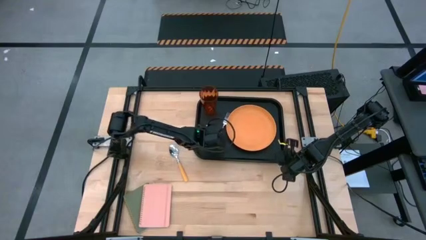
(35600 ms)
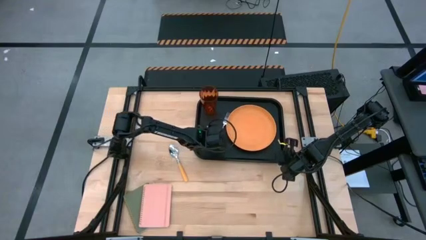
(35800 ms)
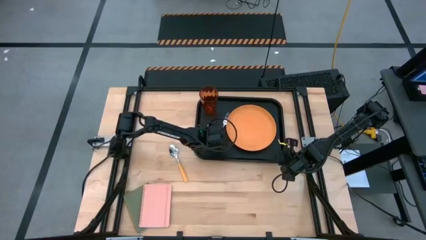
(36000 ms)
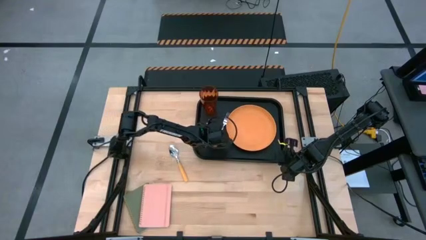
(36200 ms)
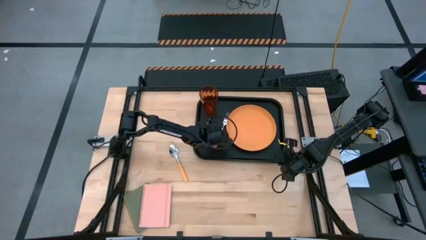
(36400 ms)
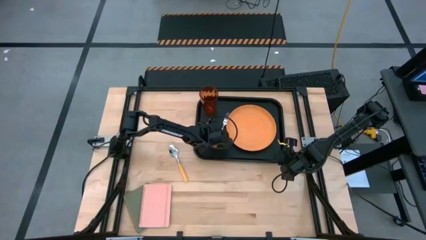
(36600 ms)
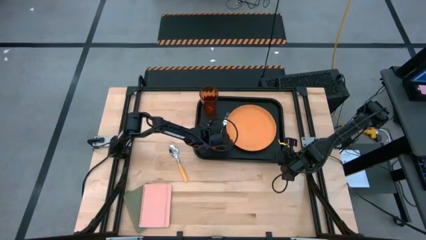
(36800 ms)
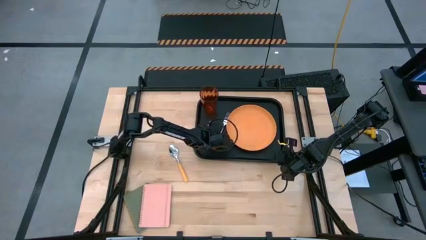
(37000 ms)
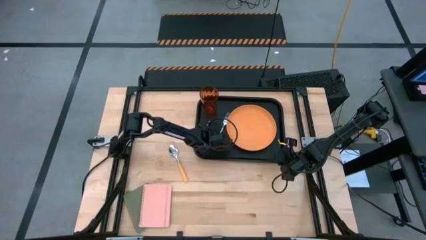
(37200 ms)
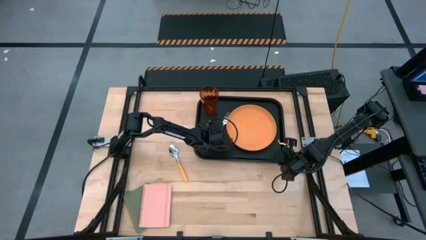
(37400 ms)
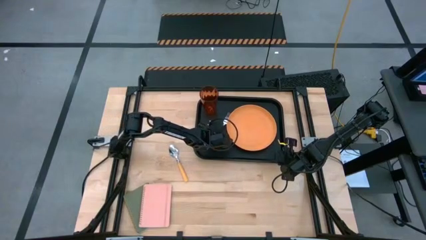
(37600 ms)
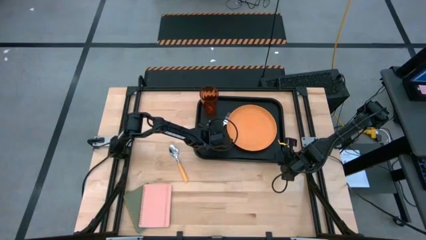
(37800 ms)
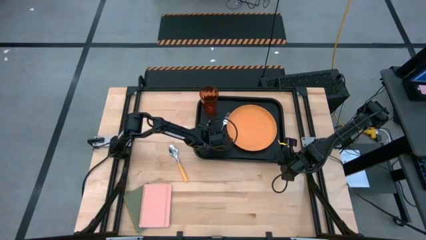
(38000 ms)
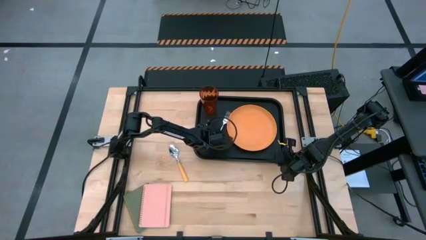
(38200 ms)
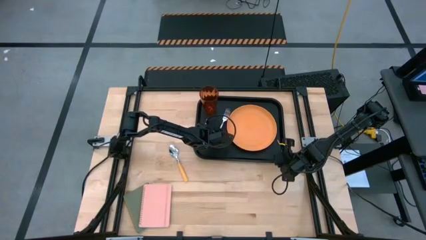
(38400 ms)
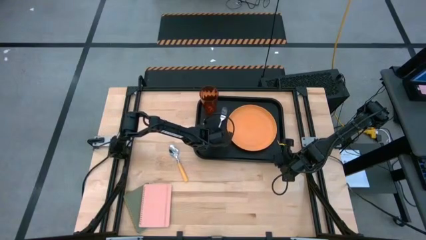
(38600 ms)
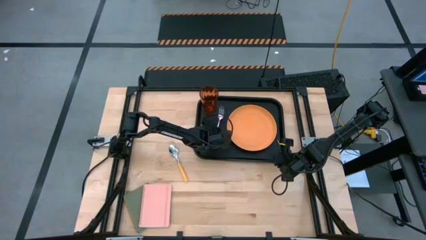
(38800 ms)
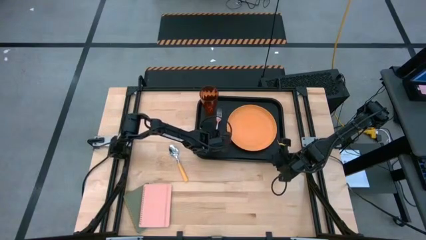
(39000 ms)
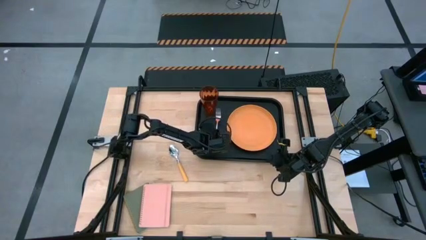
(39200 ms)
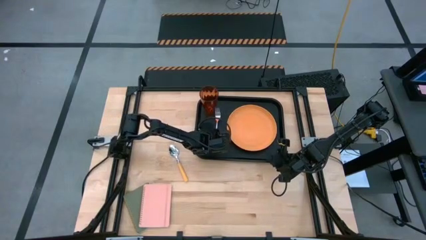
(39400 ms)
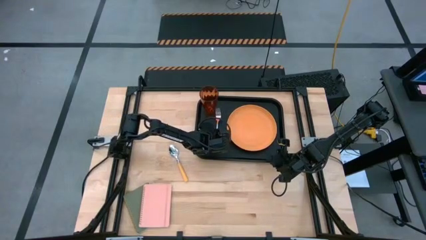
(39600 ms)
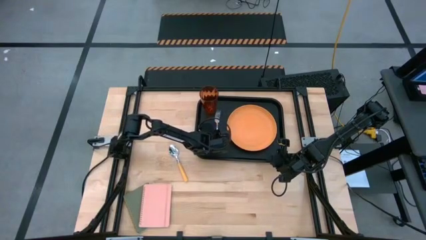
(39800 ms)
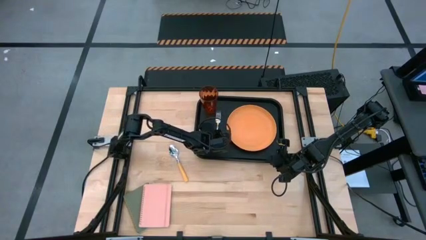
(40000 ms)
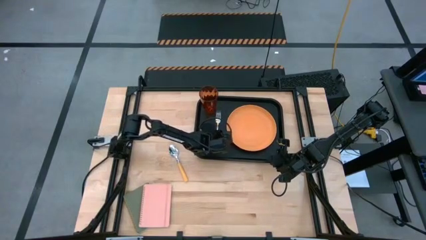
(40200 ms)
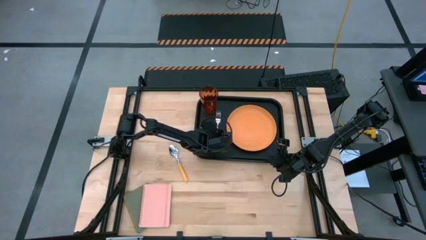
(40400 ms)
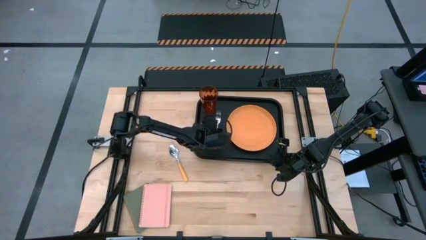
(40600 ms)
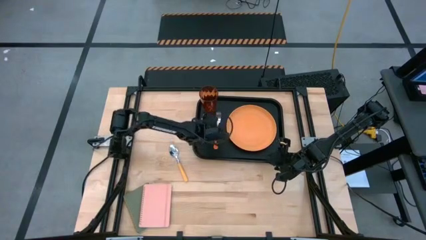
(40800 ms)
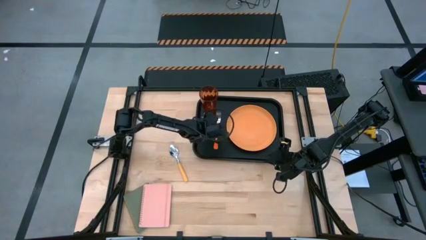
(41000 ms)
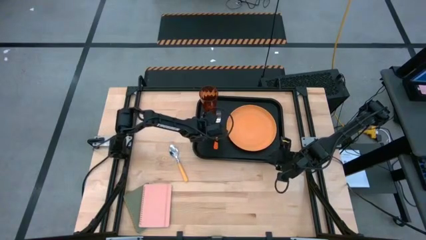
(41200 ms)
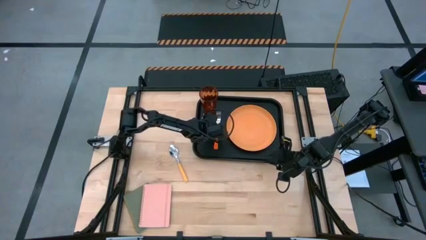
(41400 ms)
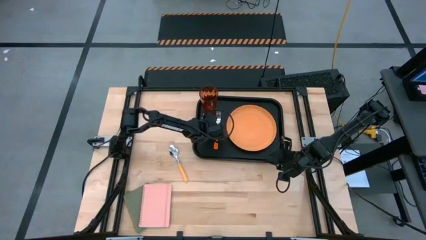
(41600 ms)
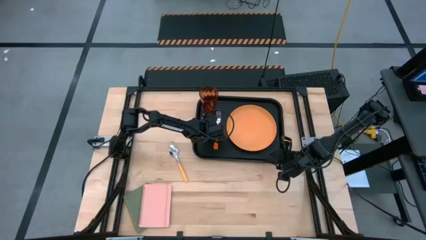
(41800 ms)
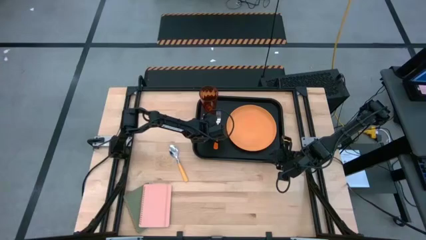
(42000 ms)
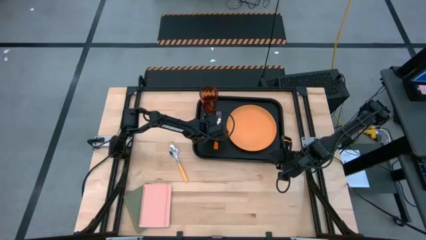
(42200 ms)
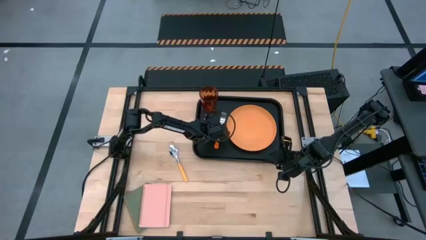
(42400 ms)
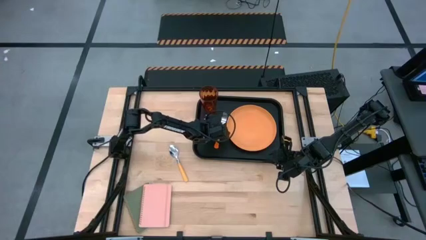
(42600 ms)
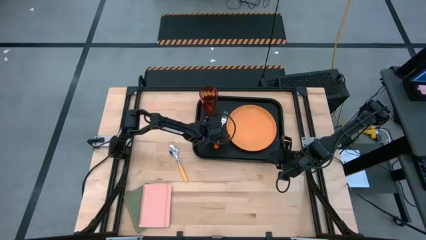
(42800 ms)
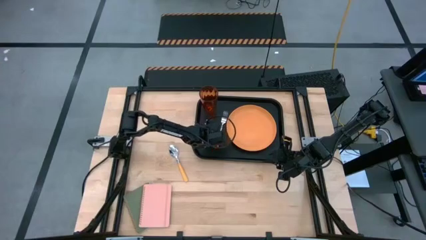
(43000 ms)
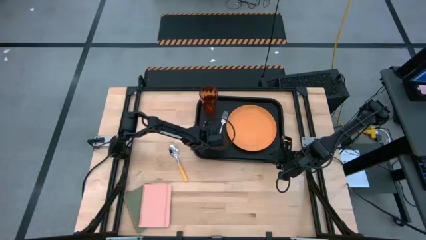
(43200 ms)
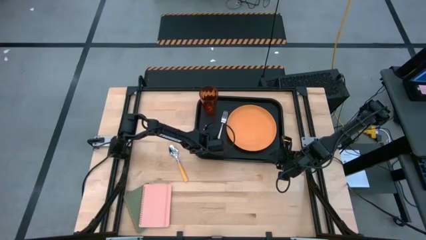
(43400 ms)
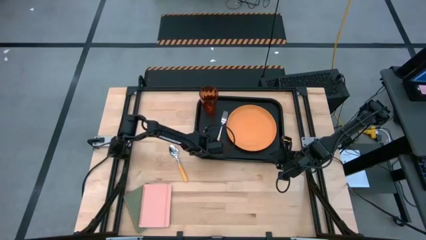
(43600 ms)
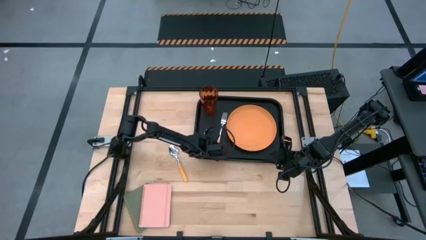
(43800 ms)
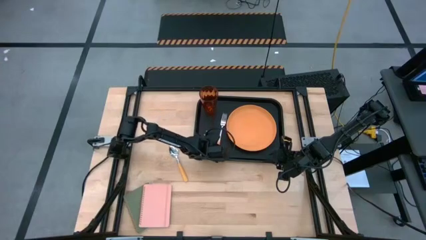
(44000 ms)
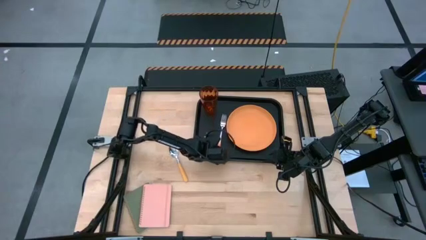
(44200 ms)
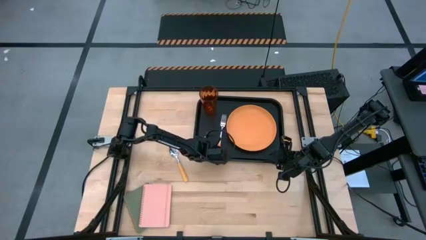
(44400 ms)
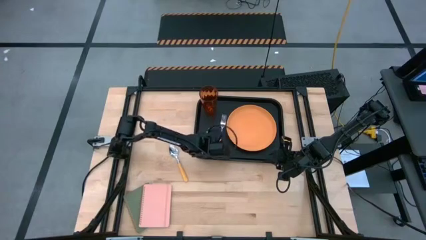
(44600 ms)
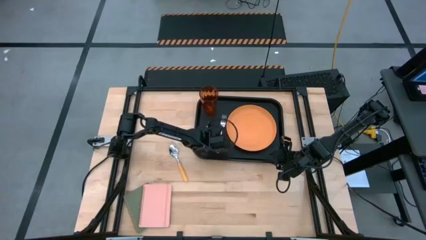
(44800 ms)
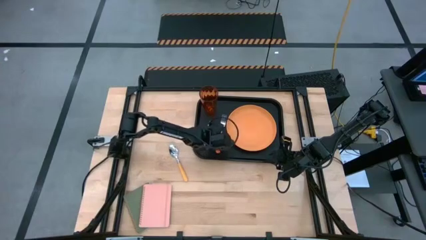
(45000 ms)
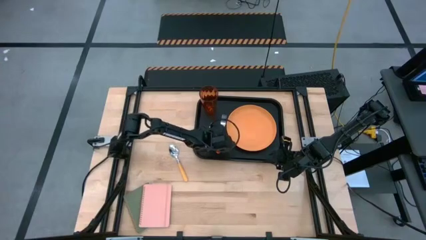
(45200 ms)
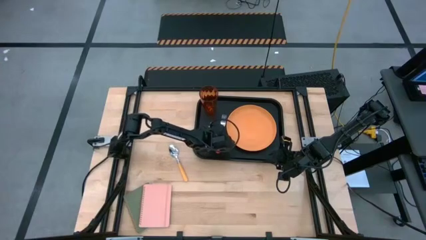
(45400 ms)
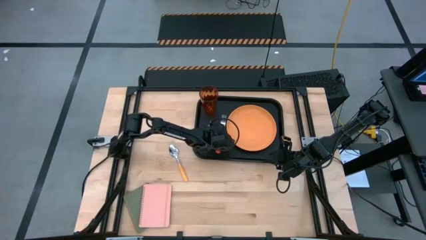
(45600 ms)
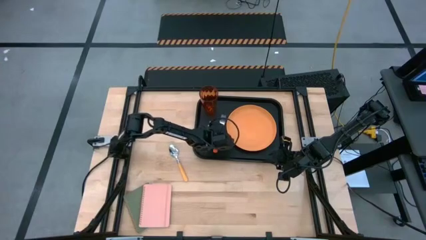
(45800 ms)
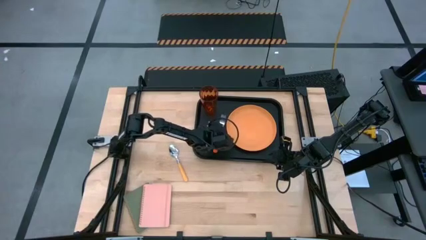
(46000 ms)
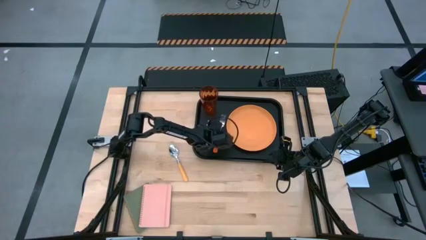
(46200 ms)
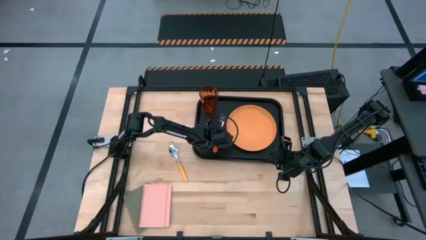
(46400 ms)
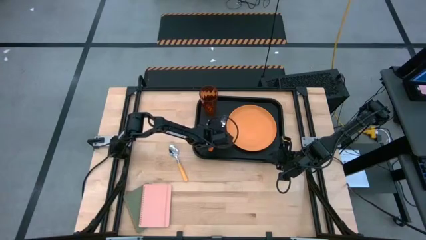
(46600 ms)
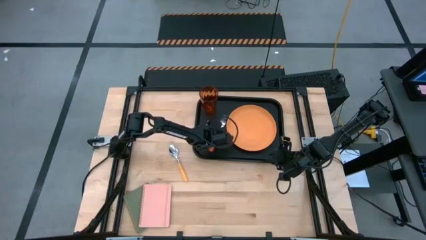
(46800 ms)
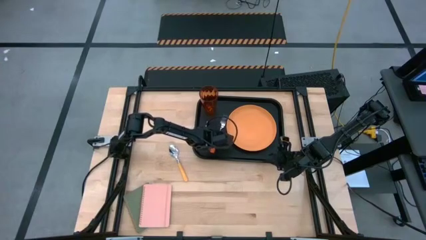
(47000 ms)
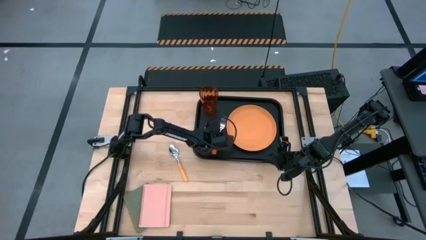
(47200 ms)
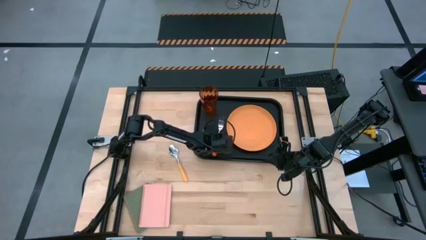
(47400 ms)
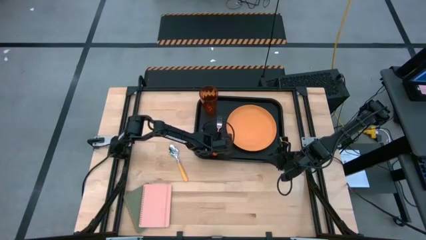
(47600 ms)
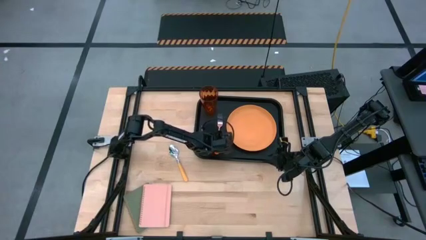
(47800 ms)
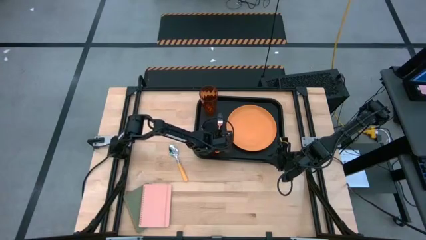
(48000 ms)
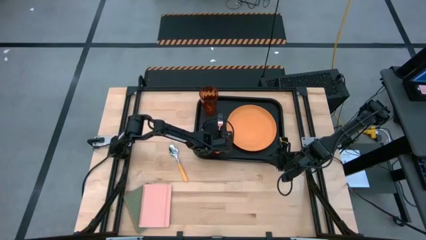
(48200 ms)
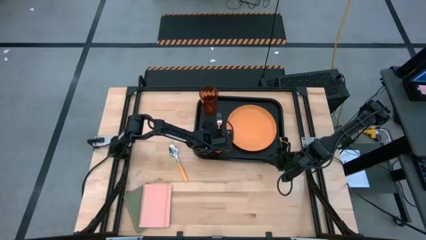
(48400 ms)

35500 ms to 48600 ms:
Task: Pick and place plate/cup/fork/spoon on tray
Put the orange fork on the black serving tray to the left of the orange plate
